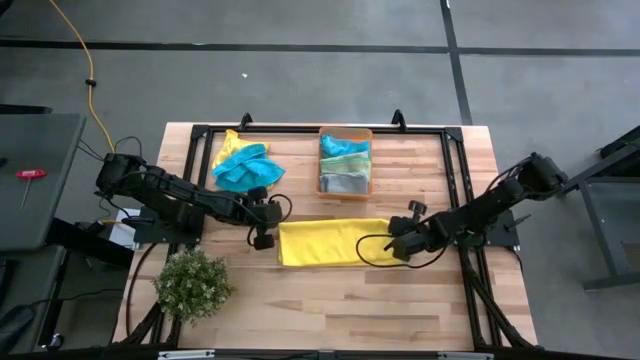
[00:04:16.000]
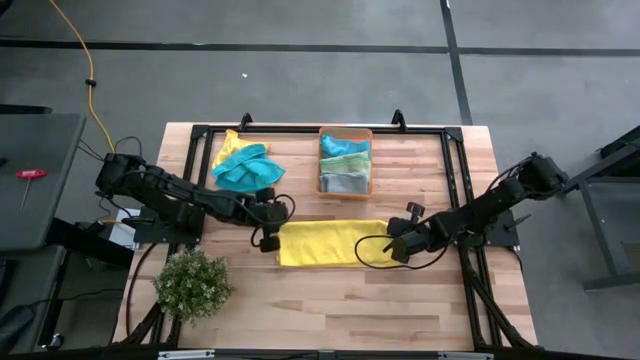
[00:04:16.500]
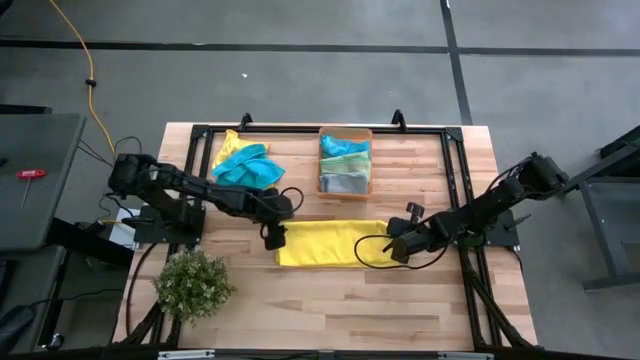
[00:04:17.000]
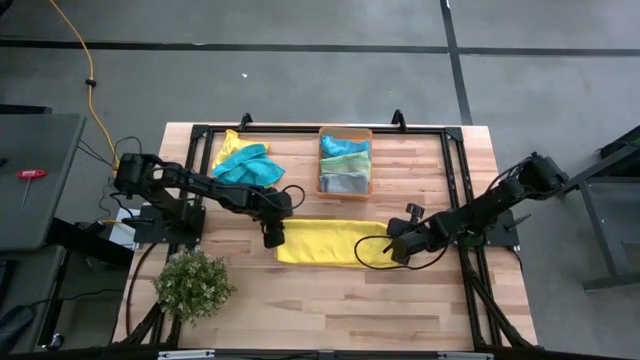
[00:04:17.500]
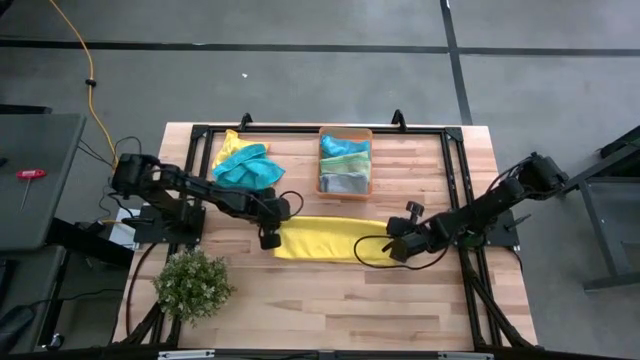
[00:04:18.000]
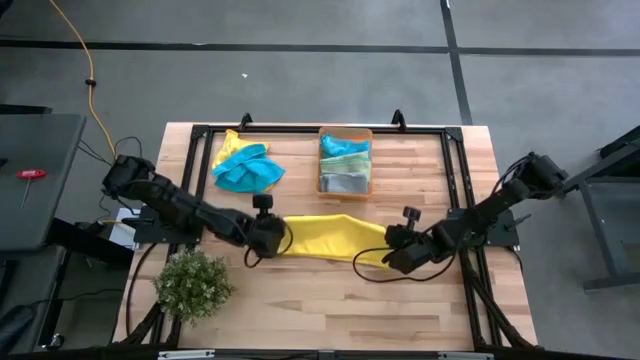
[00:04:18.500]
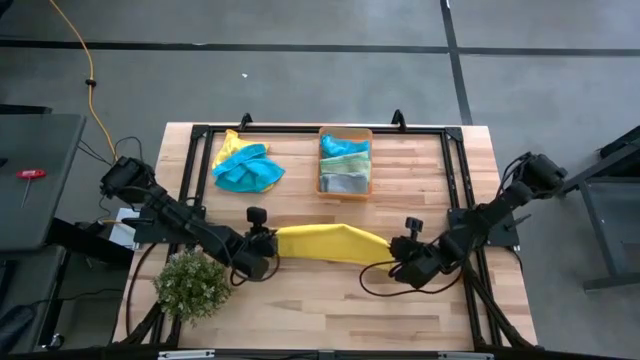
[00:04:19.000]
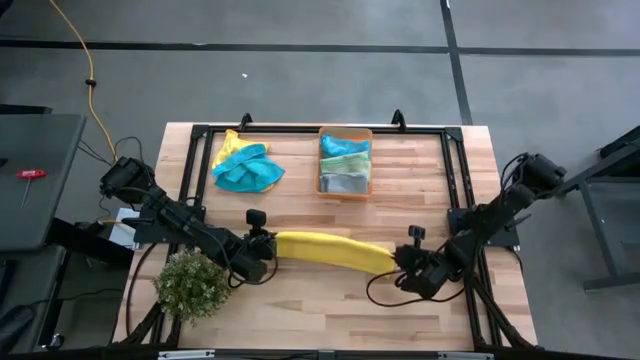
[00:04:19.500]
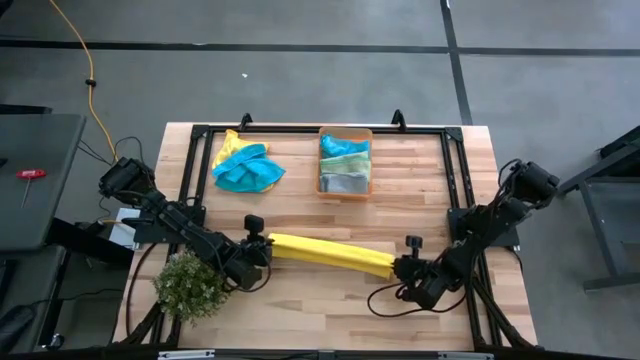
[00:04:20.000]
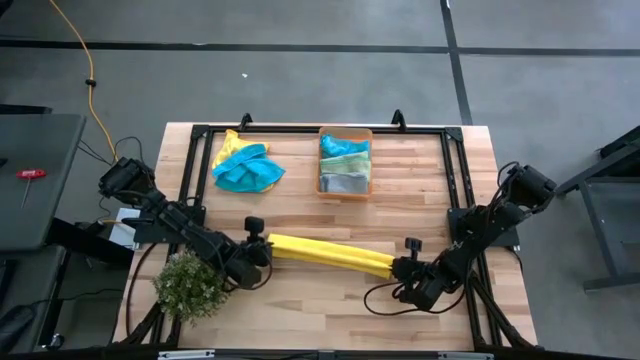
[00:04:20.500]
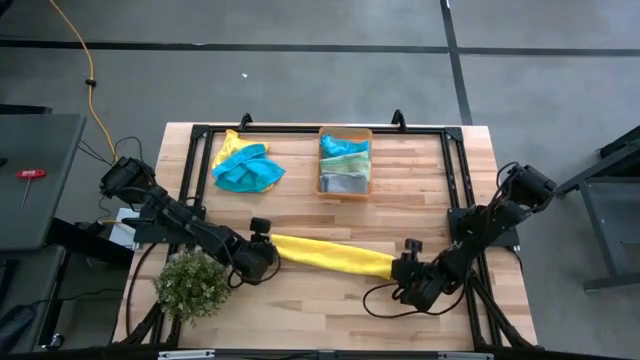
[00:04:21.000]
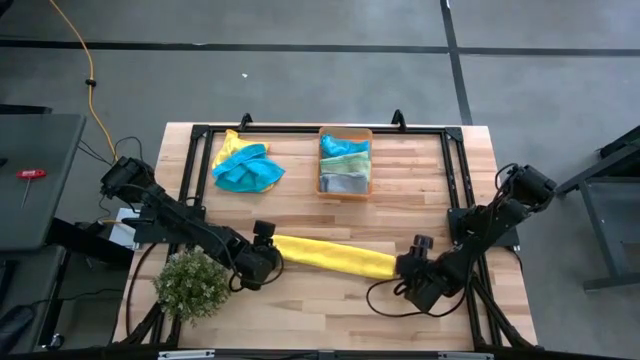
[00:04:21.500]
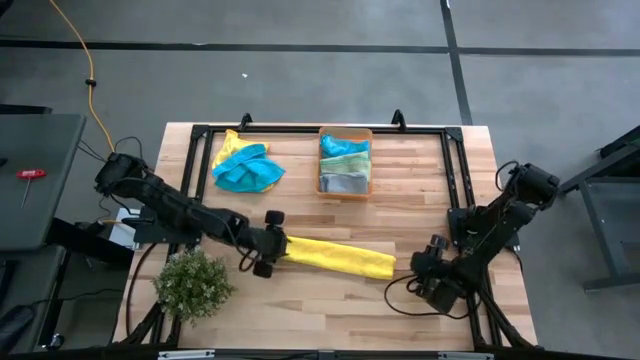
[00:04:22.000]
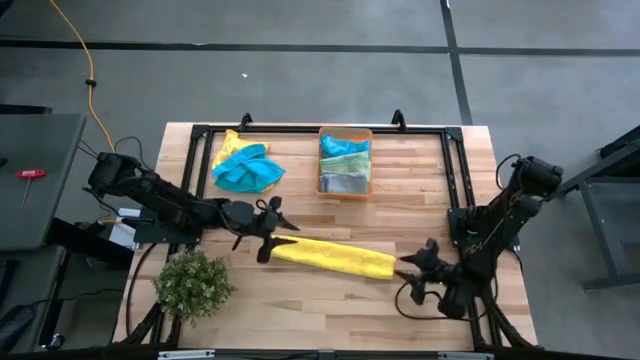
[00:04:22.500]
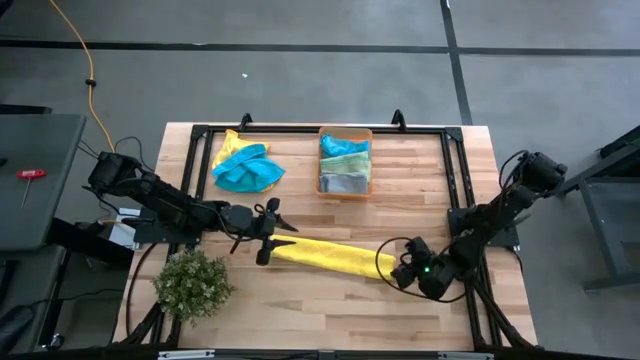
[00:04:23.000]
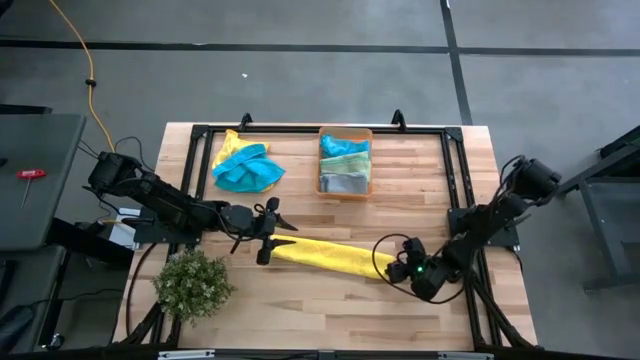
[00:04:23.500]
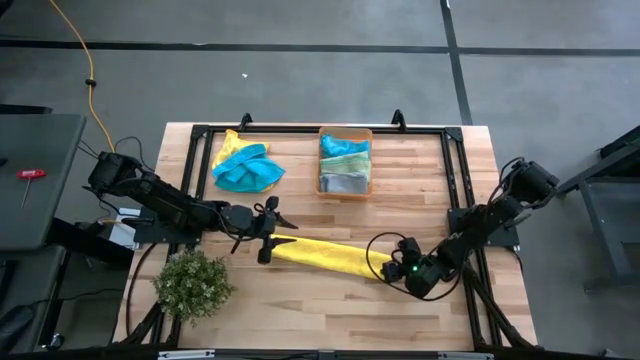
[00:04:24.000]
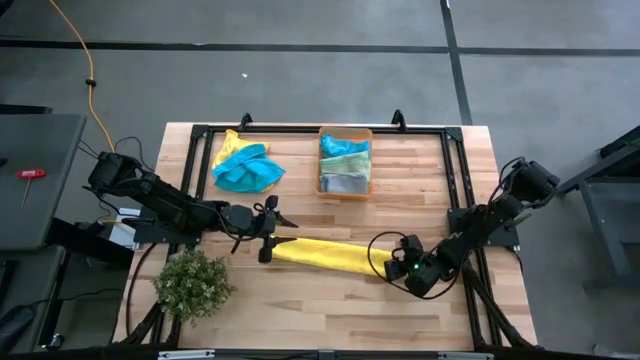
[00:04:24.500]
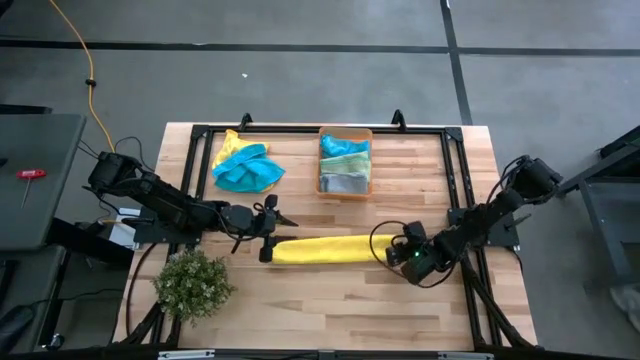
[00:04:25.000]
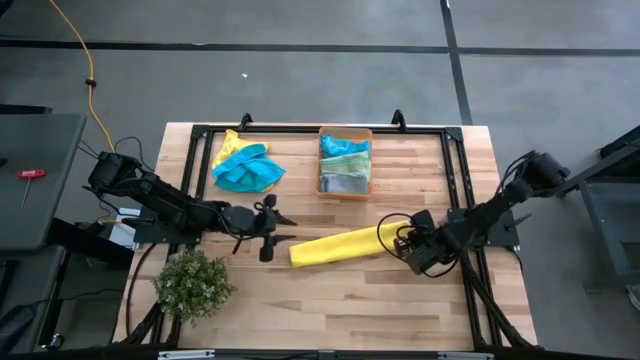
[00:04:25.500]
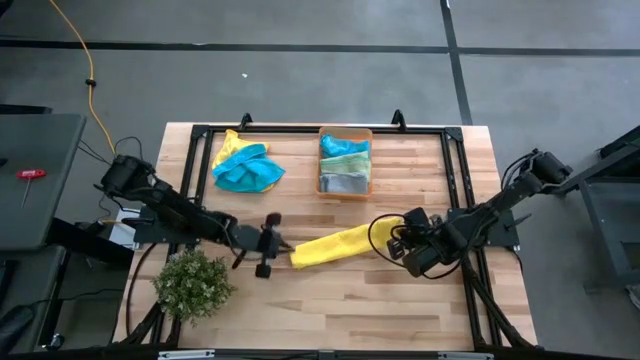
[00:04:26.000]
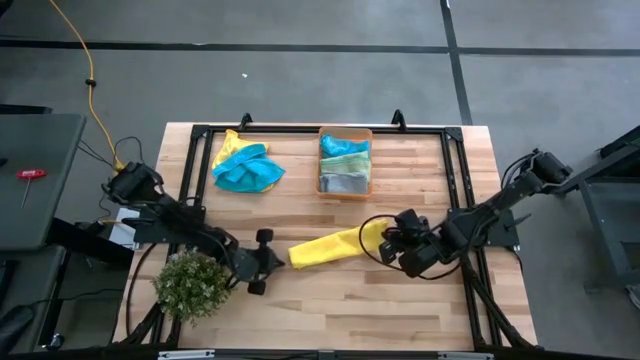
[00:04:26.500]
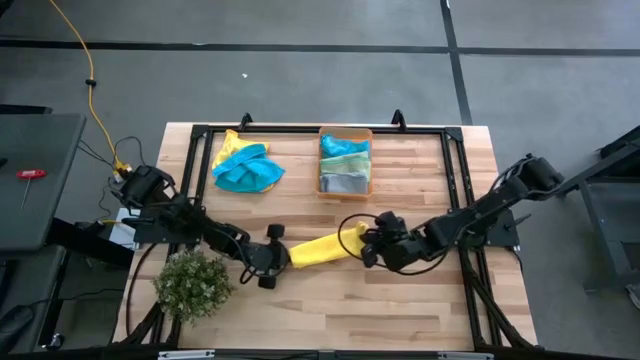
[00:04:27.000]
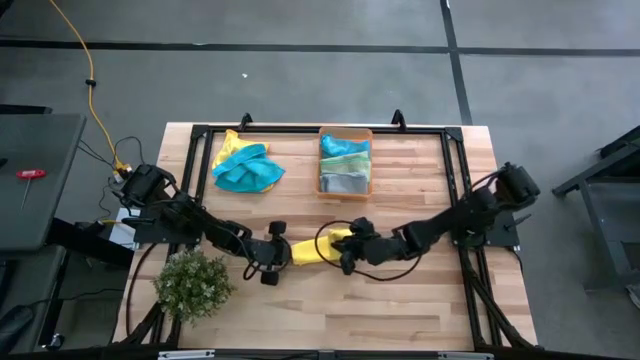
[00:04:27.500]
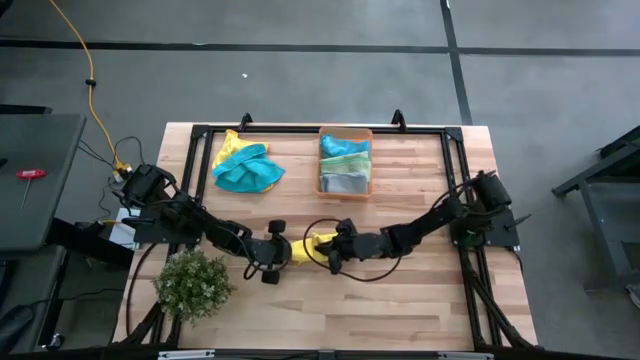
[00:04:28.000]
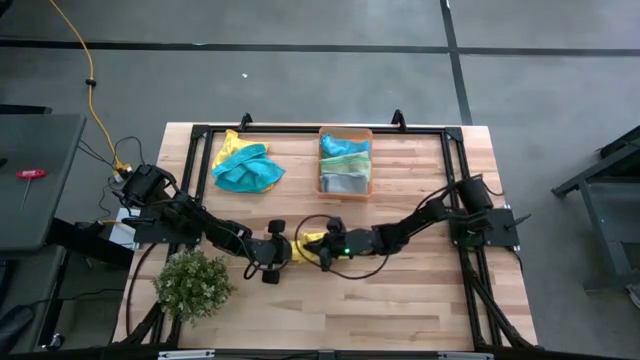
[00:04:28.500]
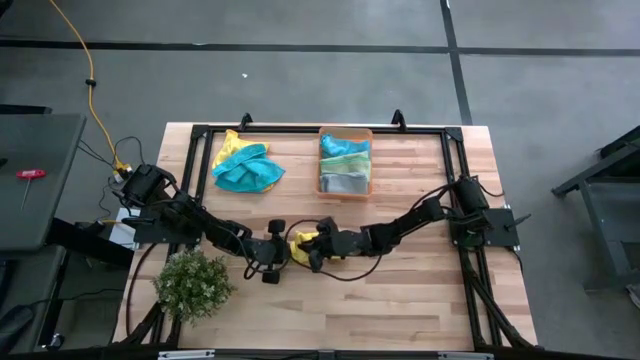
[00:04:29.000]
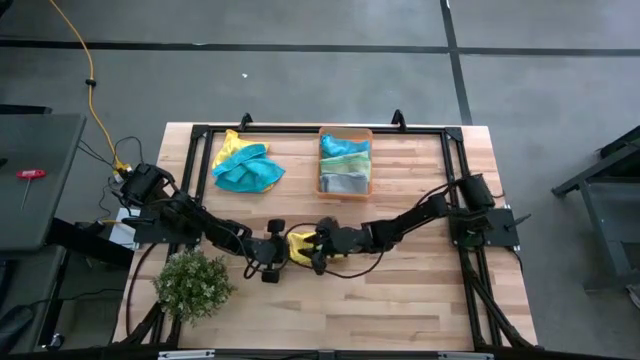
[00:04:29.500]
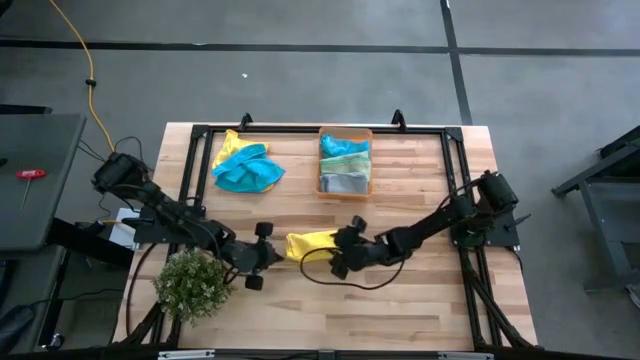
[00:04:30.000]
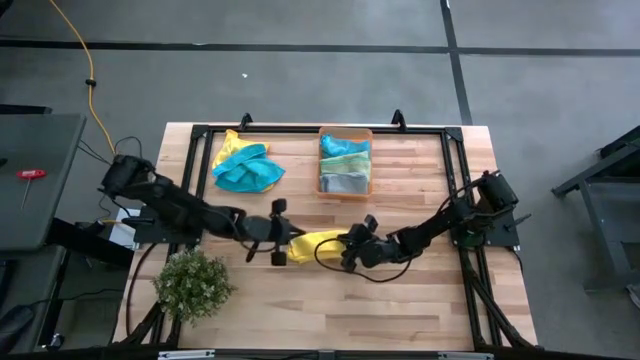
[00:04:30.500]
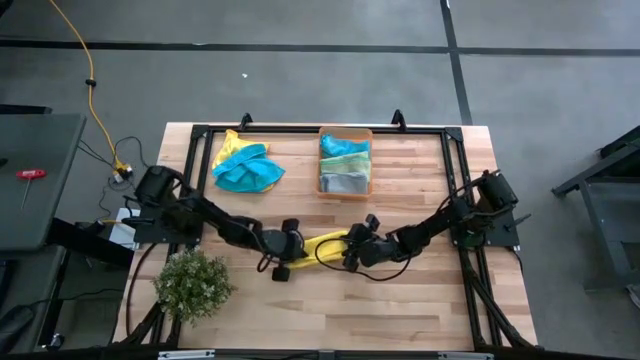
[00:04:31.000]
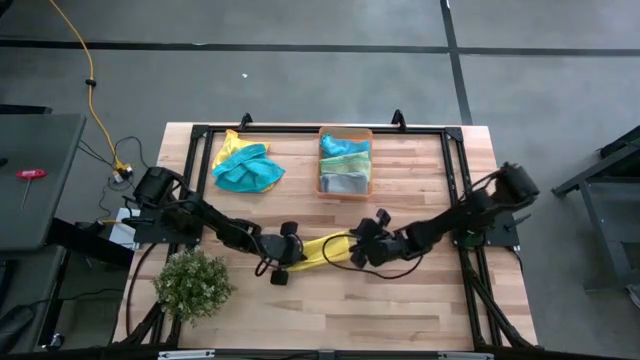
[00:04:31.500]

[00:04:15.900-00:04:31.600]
Task: Fold microfiber towels
Fold the right yellow microfiber cloth

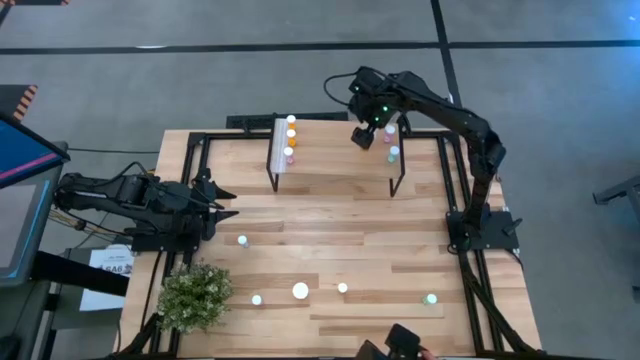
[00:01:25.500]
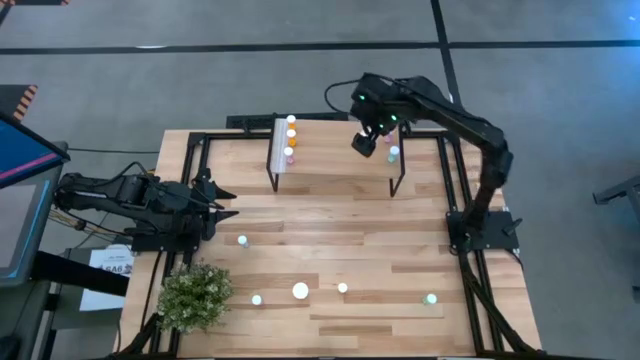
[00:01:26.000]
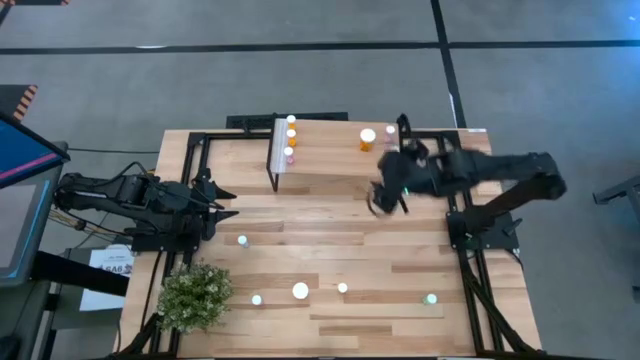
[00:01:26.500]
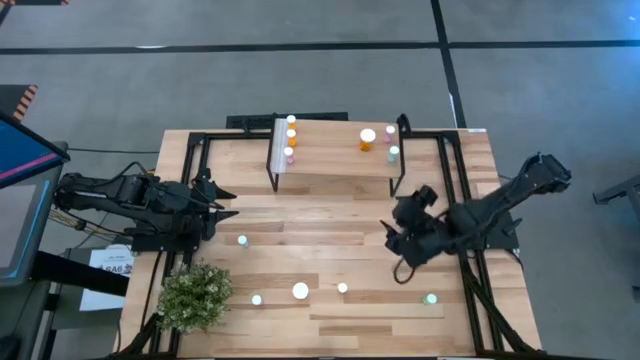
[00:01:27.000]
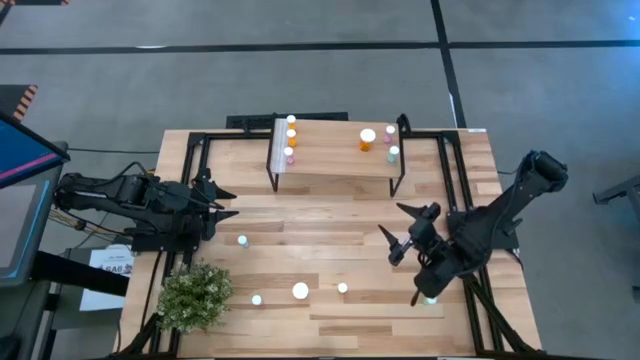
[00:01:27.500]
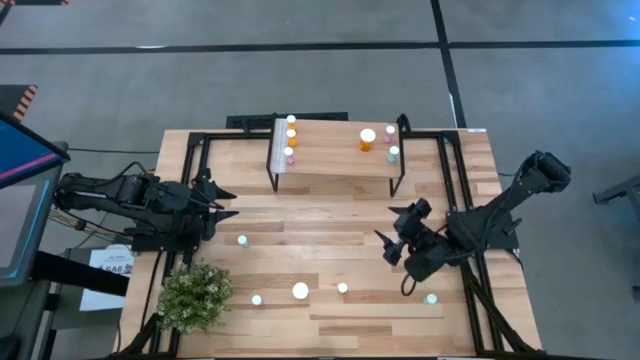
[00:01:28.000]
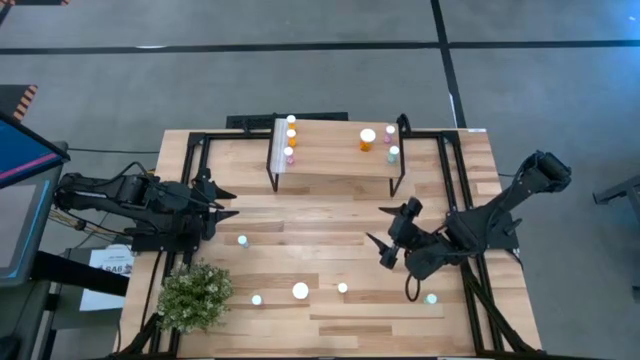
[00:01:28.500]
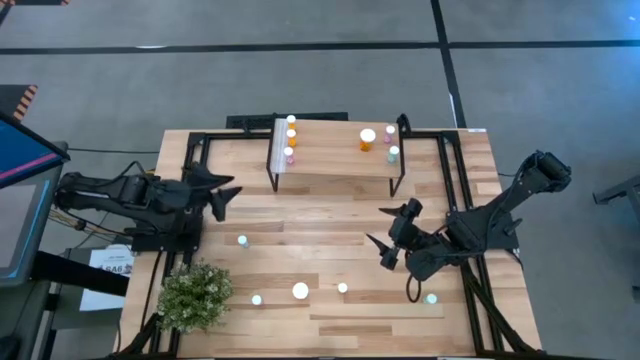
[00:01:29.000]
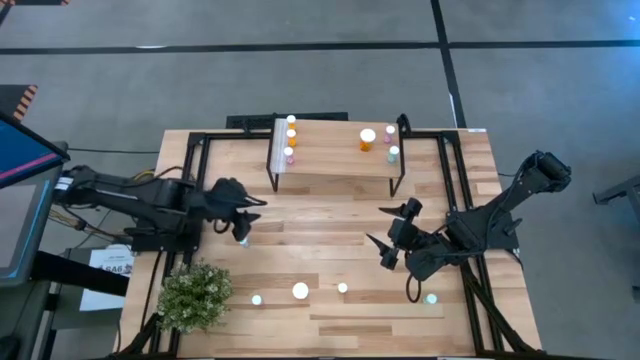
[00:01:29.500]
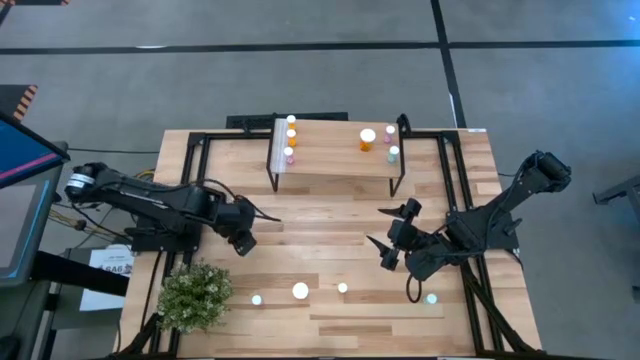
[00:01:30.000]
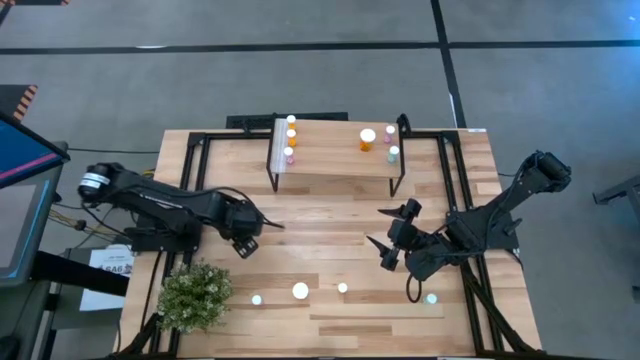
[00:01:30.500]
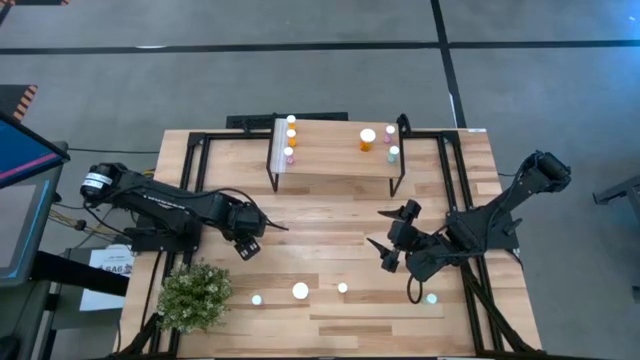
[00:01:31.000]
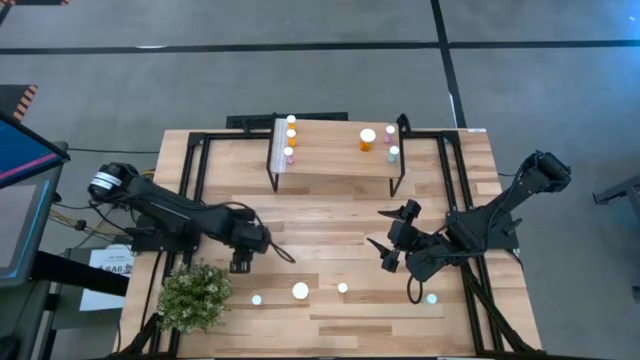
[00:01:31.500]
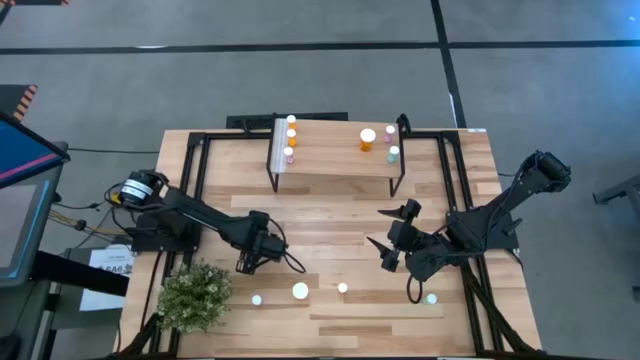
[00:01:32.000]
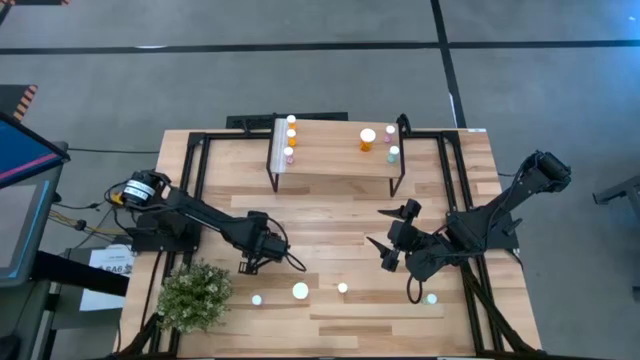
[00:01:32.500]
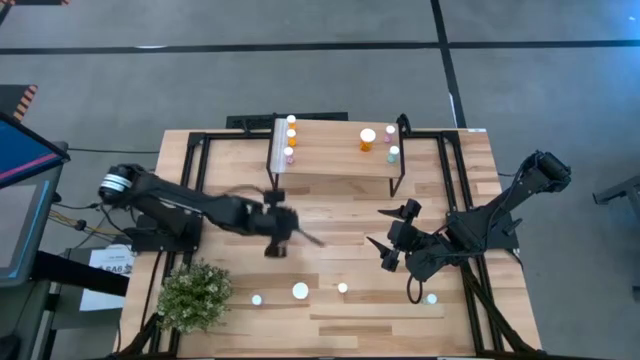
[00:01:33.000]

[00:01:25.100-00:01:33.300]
Task: Pick and place medicine bottles onto shelf by color
Put the left small blue pill bottle on the shelf
